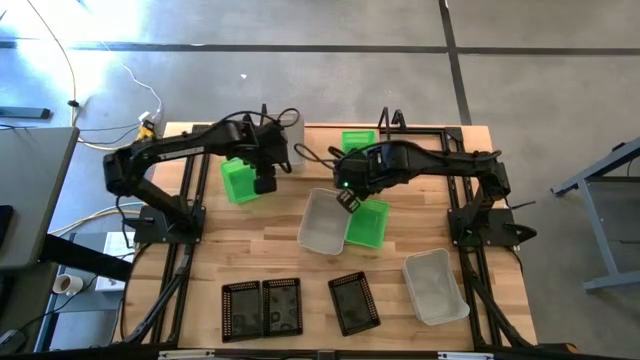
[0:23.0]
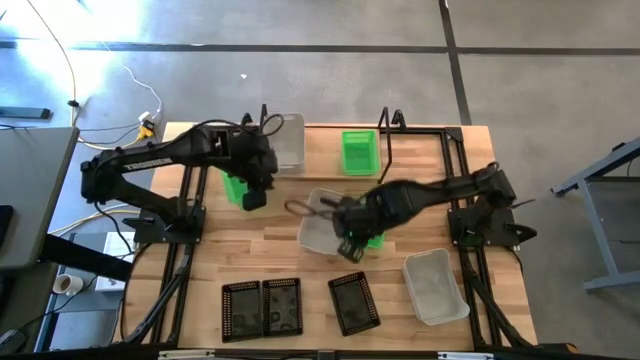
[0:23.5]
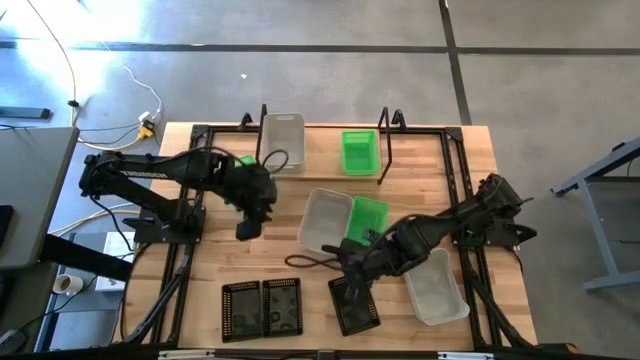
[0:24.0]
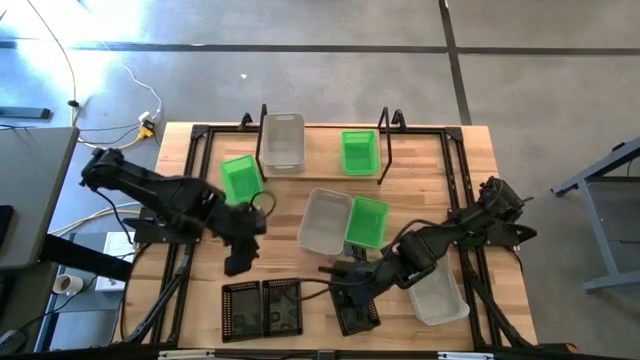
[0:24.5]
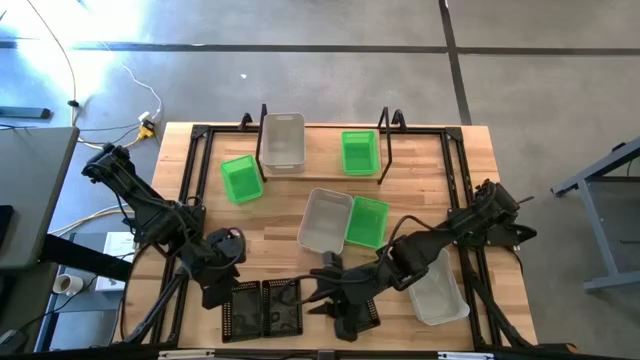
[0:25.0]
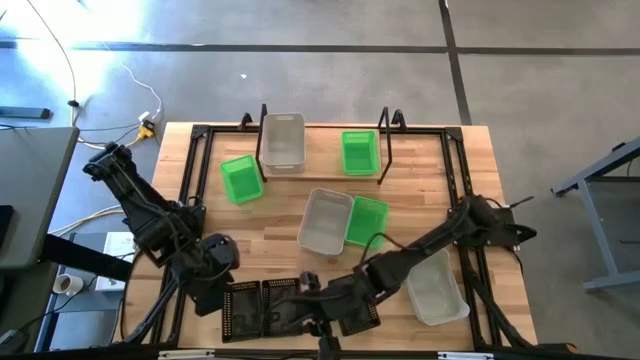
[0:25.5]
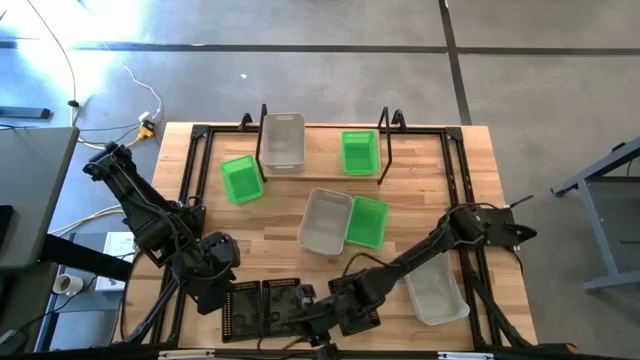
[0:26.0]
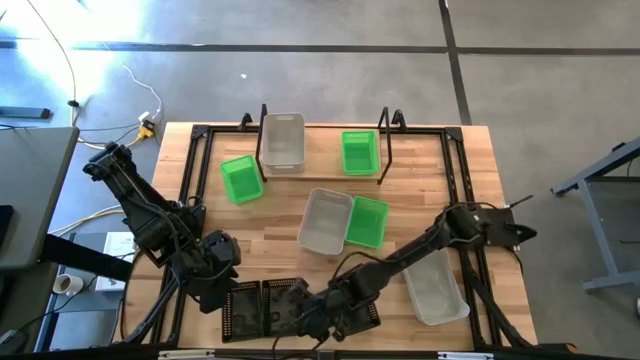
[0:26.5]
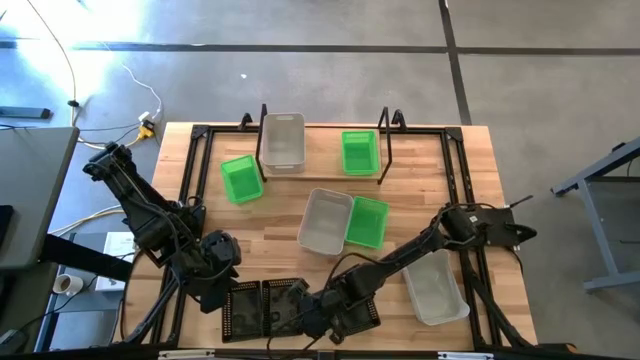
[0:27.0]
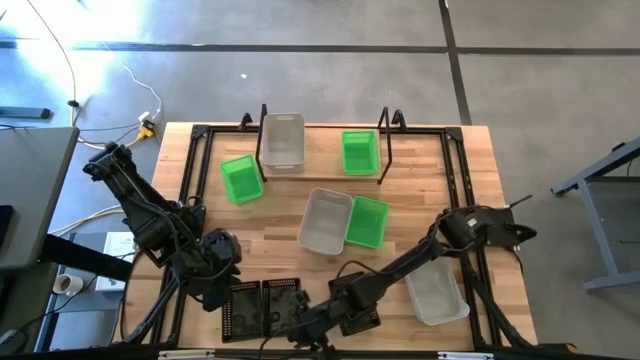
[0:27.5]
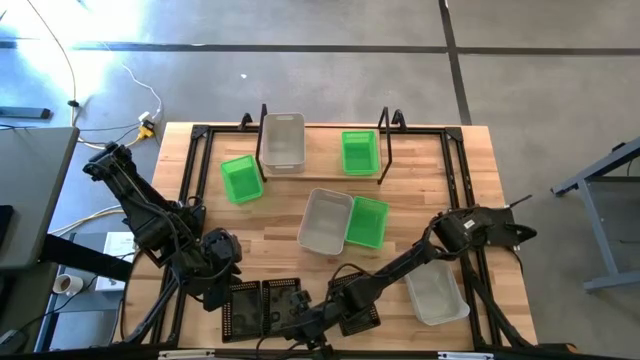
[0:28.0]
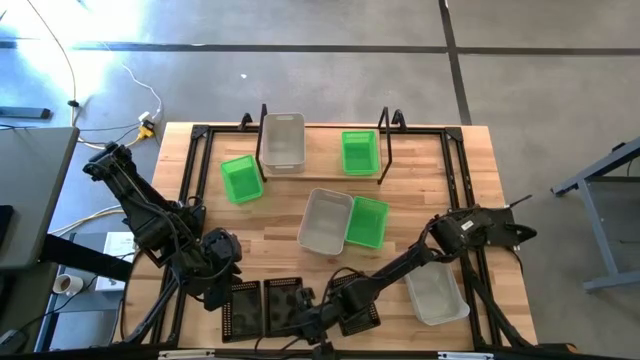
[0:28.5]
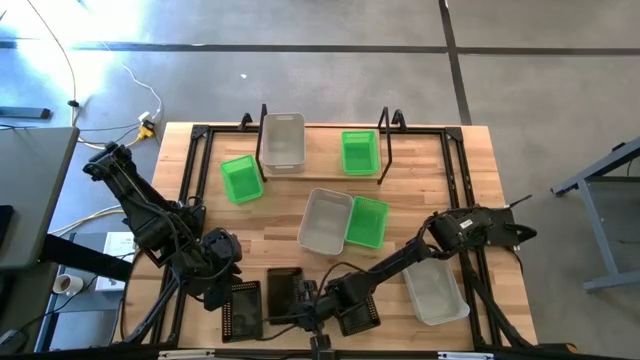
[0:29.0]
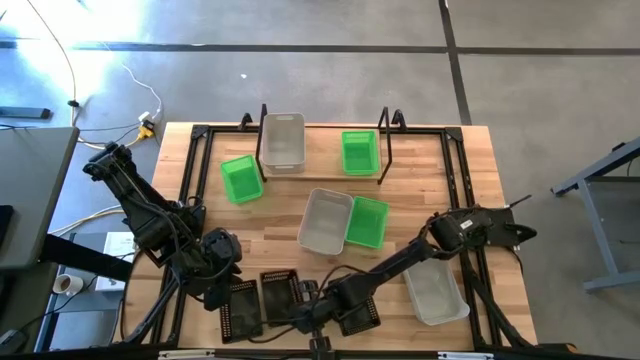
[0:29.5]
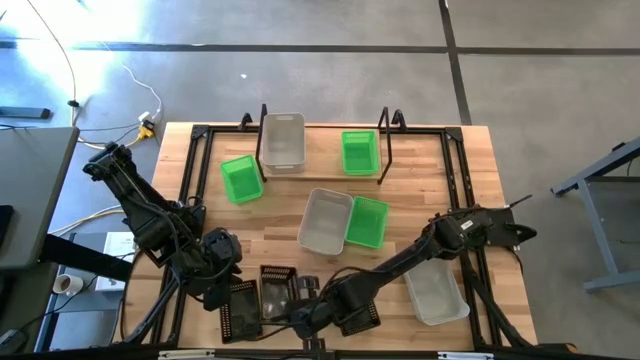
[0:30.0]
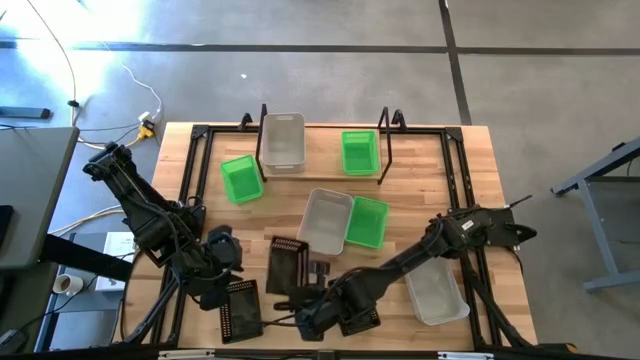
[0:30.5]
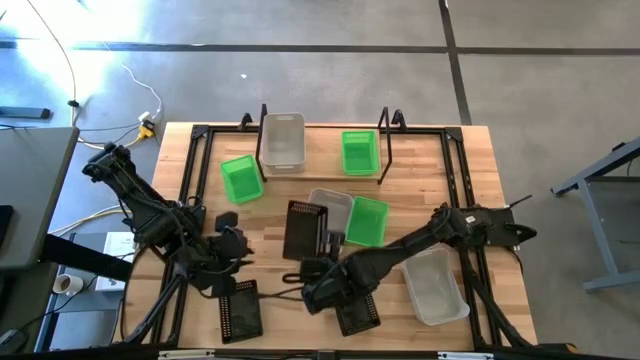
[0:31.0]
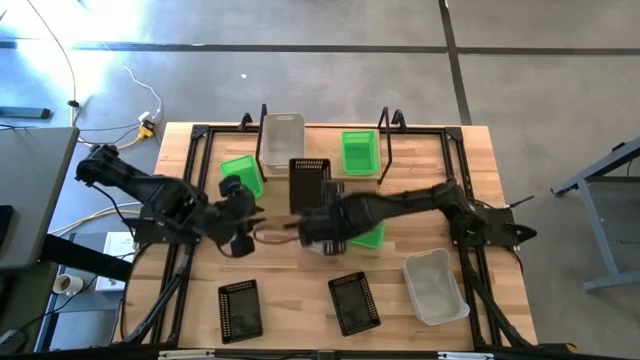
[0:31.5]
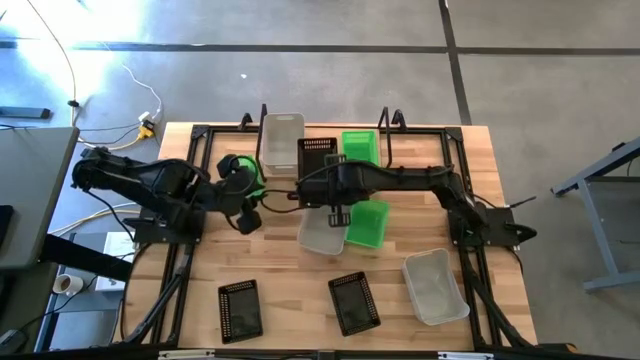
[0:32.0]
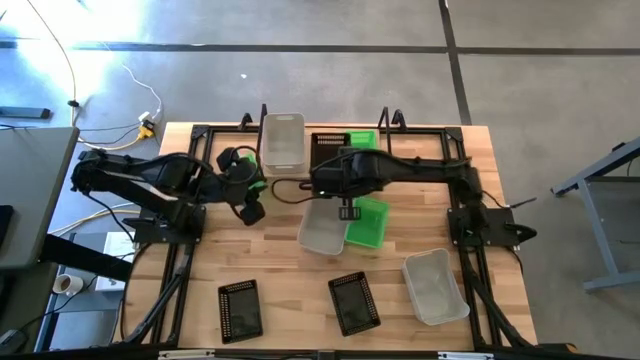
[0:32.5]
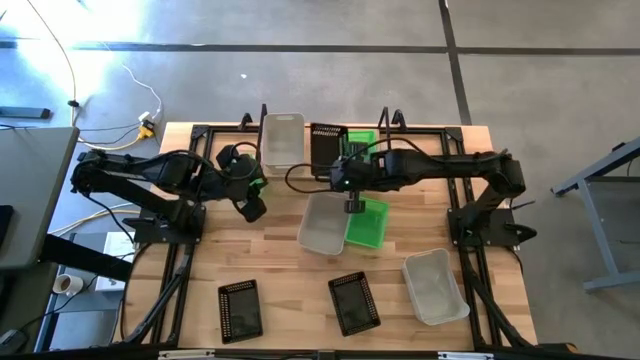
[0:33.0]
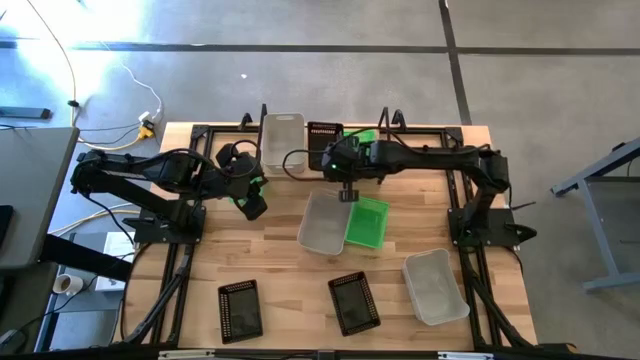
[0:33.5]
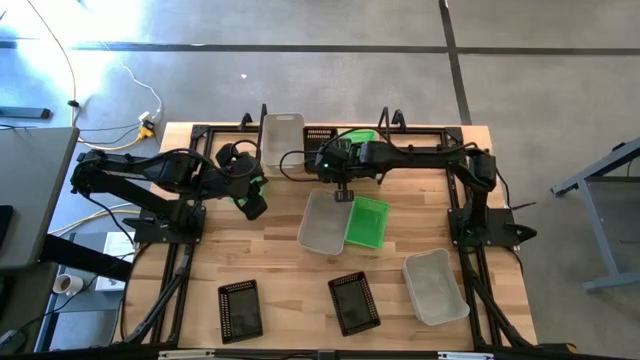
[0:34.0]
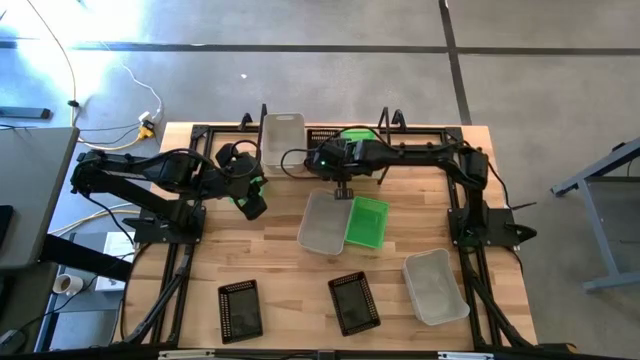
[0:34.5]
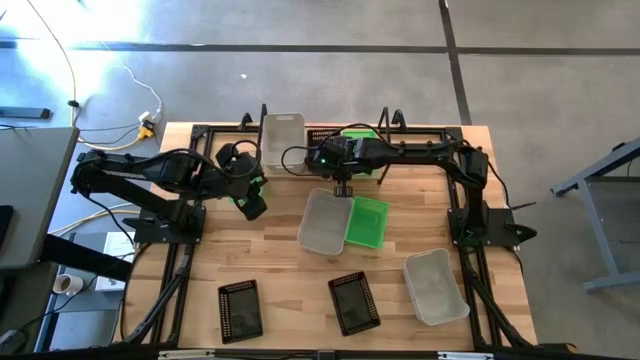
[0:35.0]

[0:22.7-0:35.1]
Task: Stack baskets on shelf by color
Put the middle black bin on the shelf

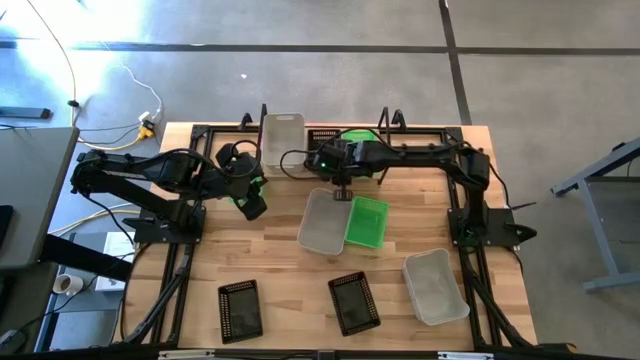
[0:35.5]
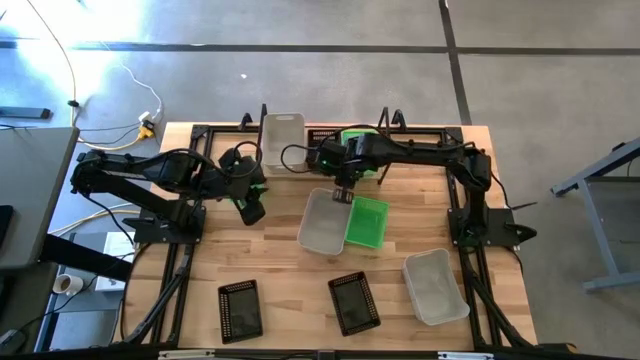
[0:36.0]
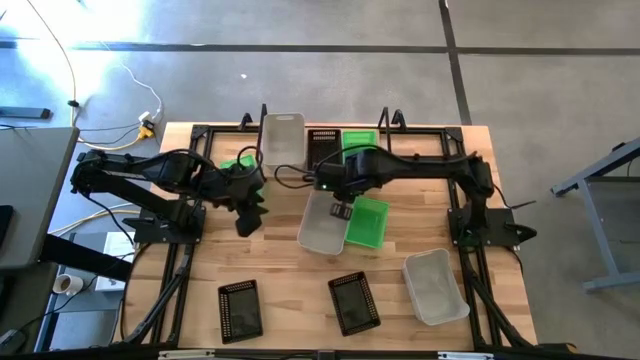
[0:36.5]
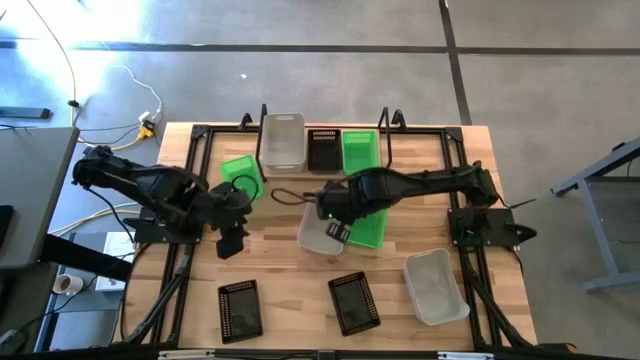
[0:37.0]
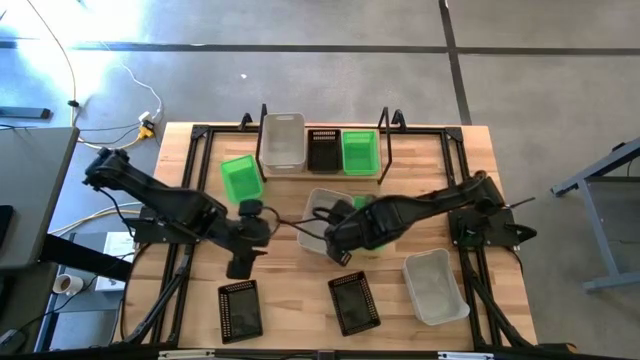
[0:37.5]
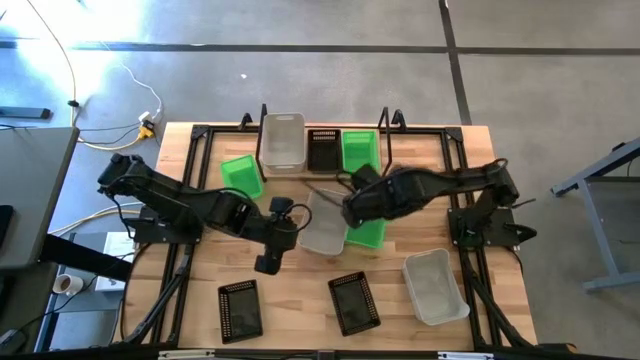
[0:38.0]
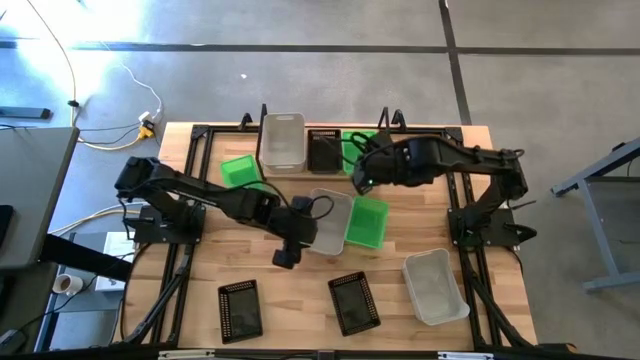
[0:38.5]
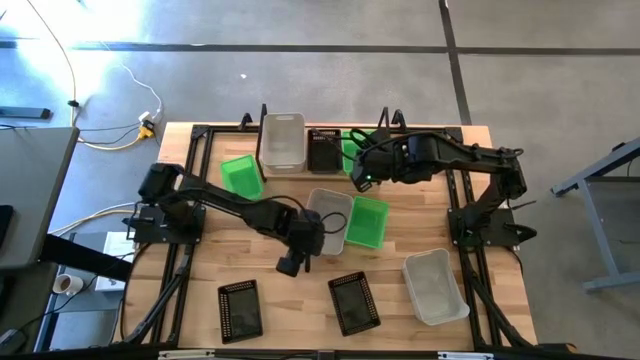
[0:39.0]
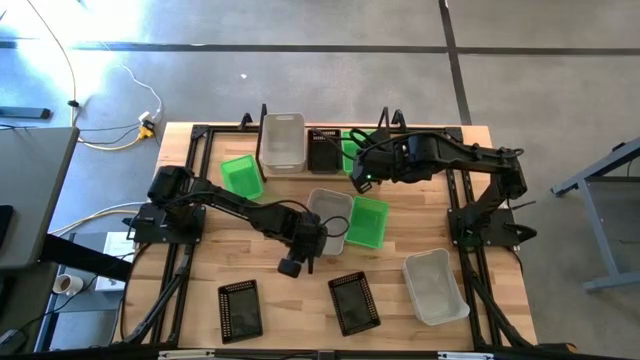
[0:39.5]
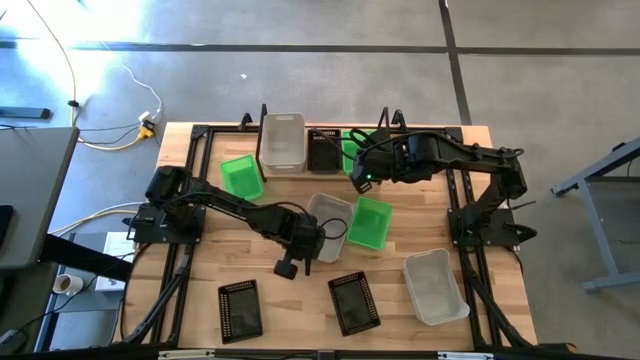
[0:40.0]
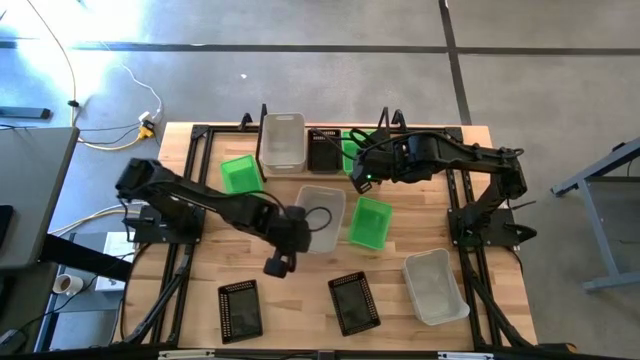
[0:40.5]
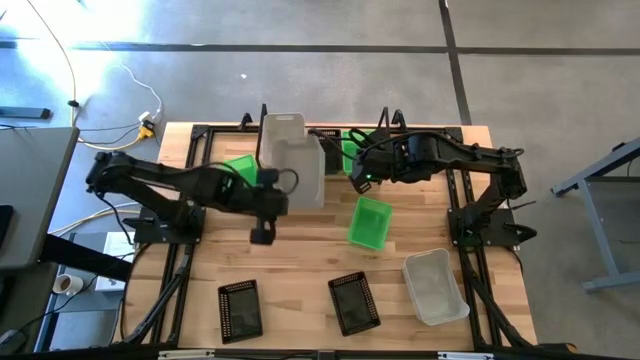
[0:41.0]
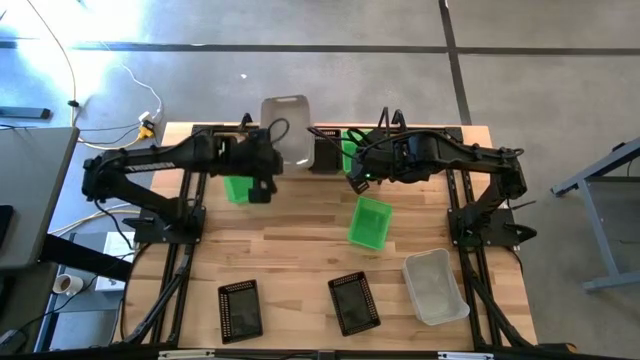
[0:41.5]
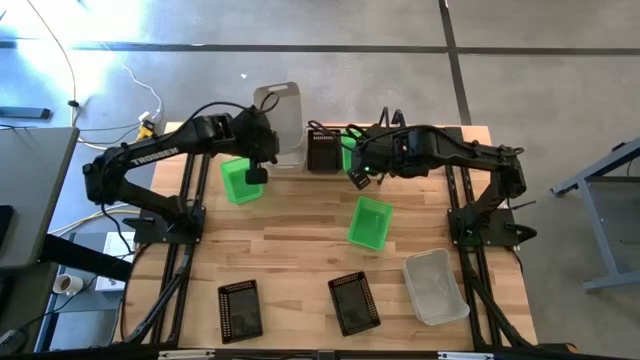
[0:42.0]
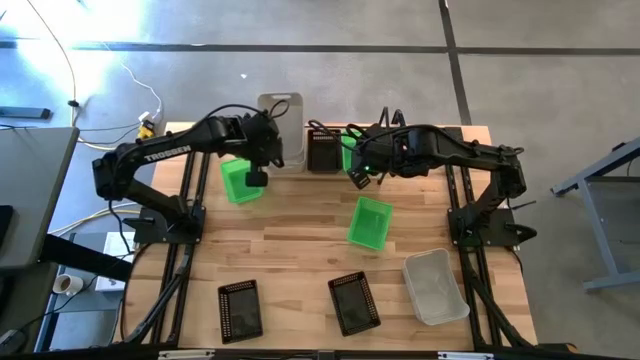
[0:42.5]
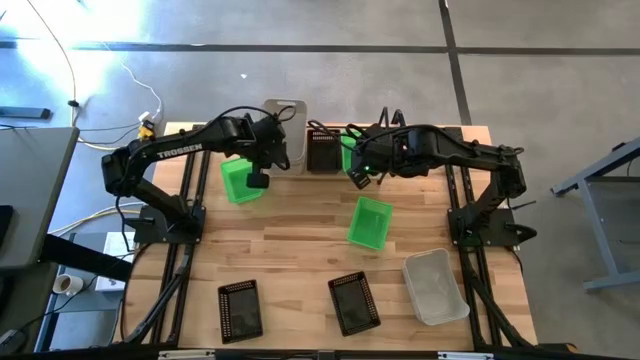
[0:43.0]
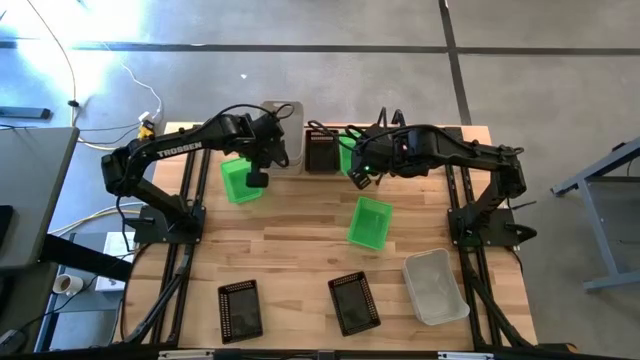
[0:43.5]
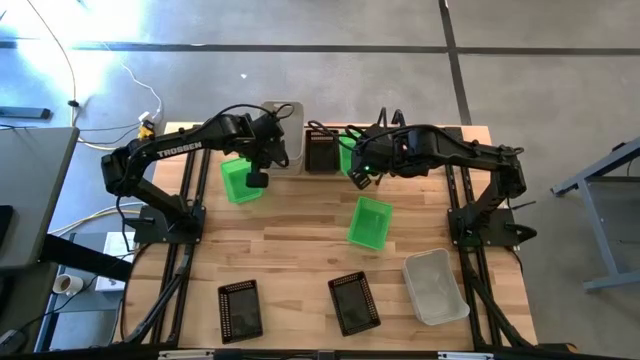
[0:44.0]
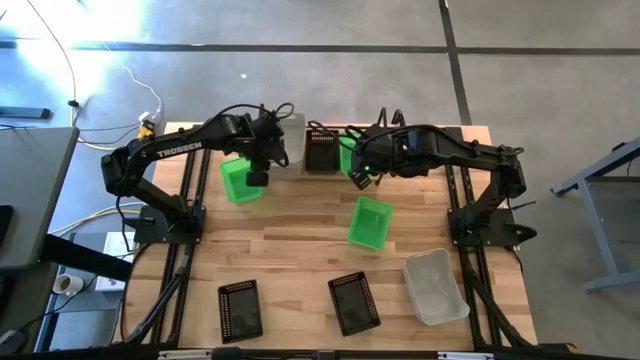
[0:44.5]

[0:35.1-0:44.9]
Stack the top gray bin on the gray bin on the shelf
